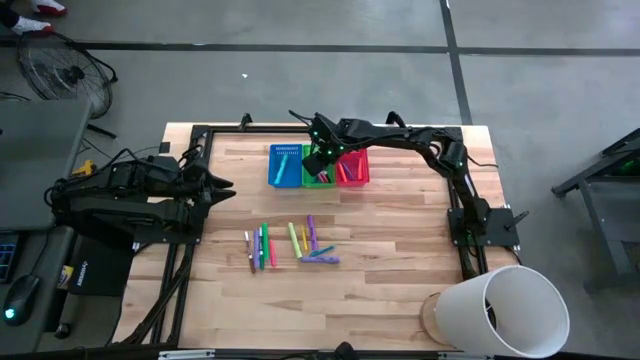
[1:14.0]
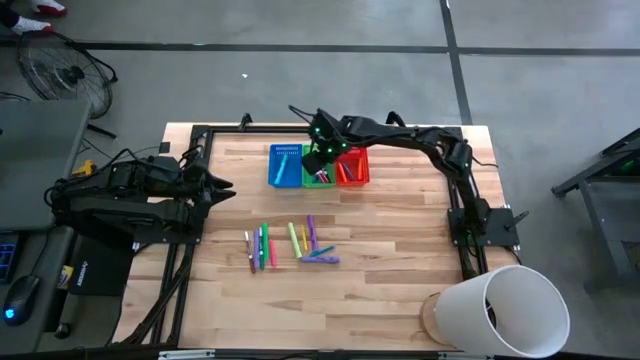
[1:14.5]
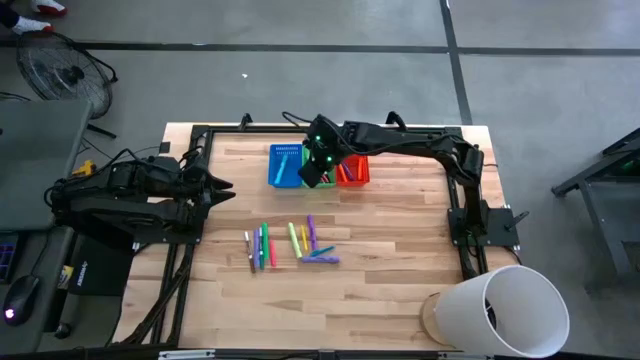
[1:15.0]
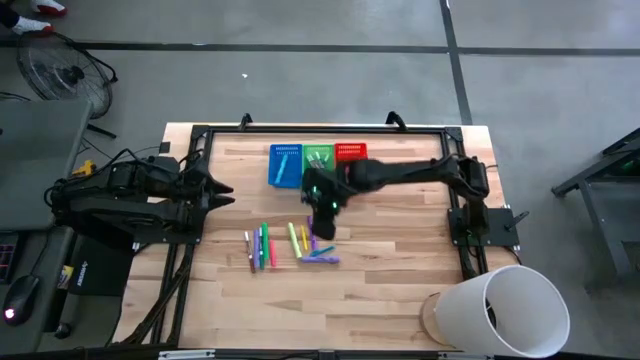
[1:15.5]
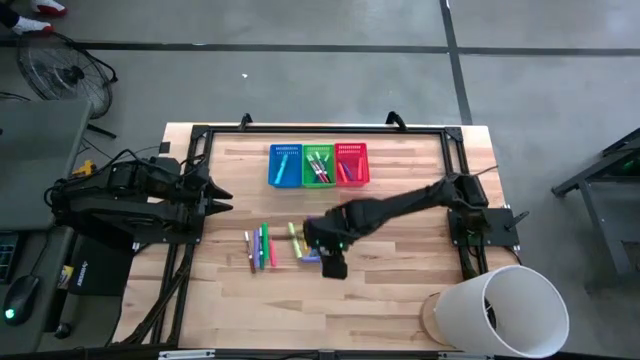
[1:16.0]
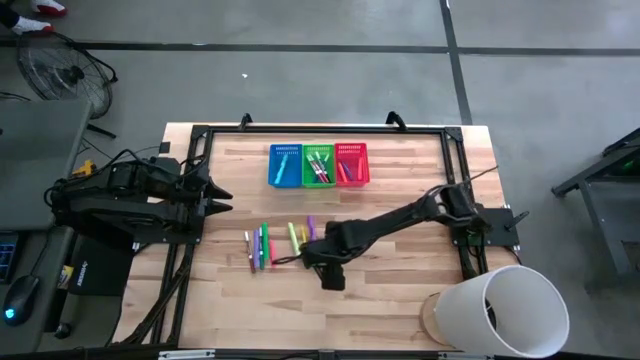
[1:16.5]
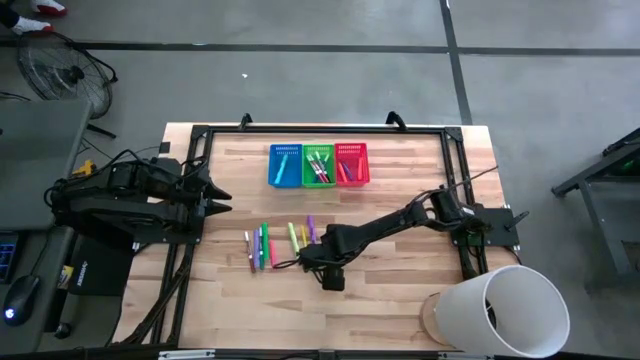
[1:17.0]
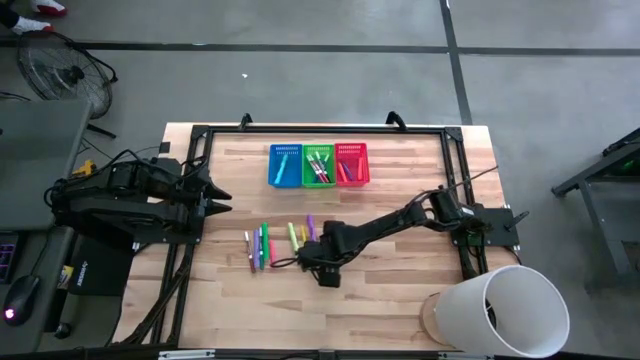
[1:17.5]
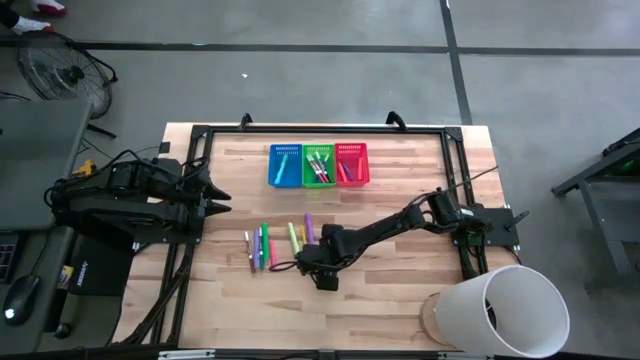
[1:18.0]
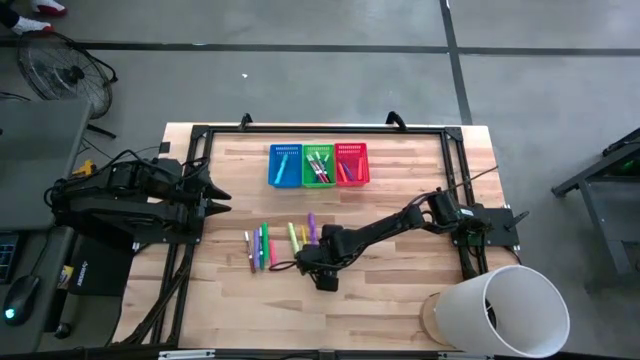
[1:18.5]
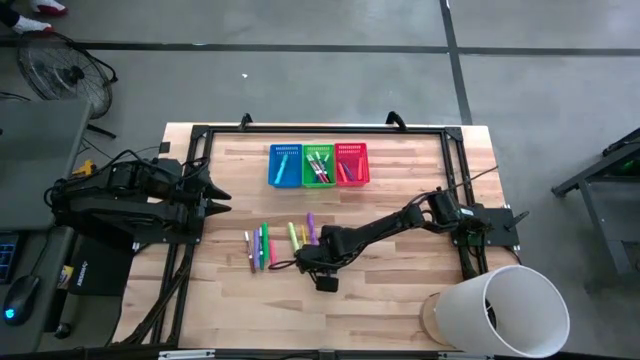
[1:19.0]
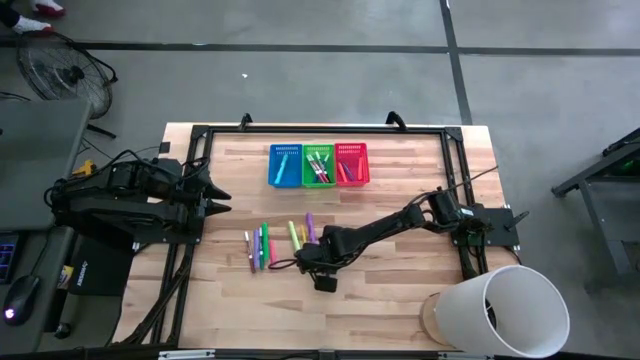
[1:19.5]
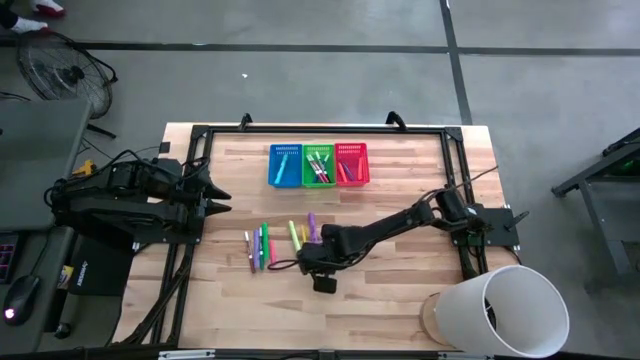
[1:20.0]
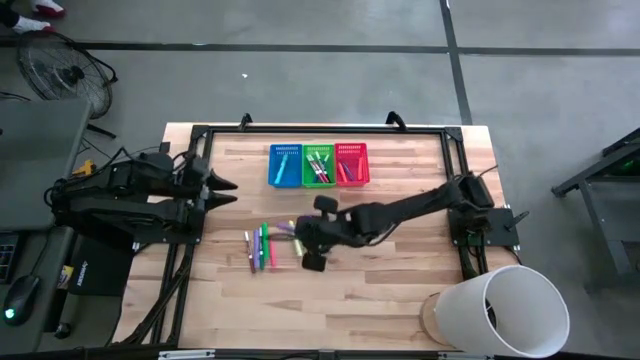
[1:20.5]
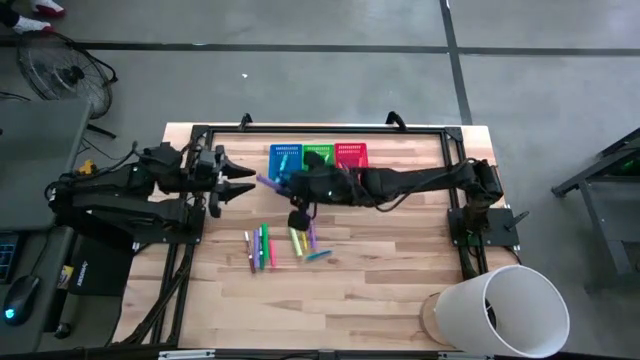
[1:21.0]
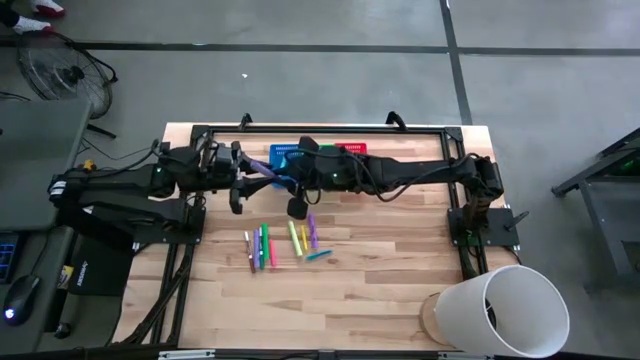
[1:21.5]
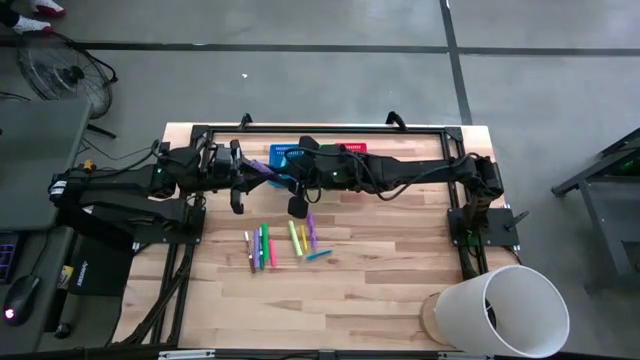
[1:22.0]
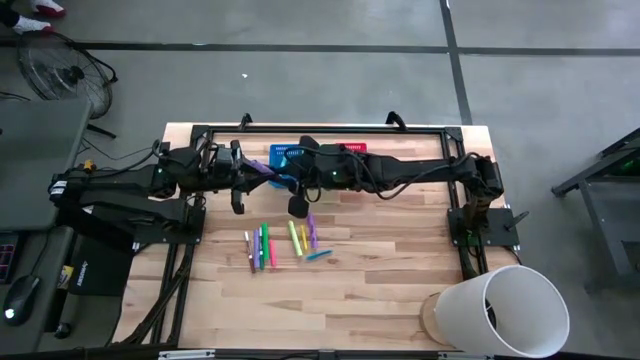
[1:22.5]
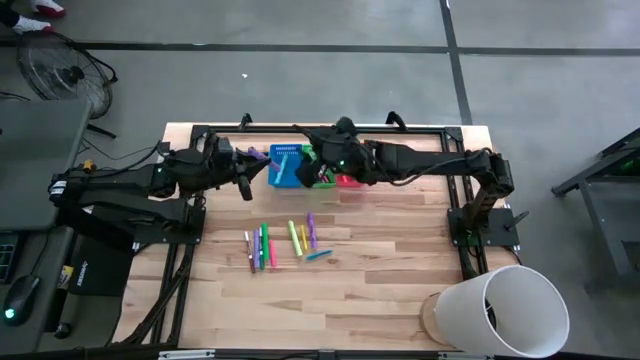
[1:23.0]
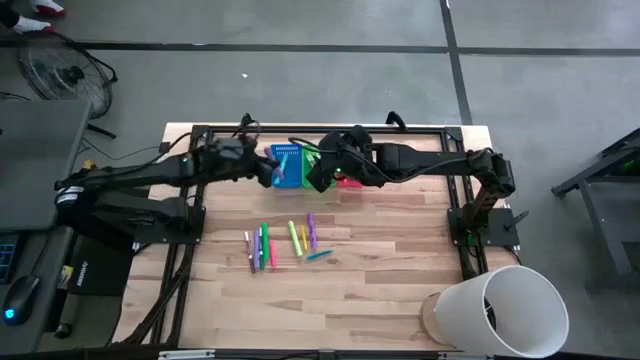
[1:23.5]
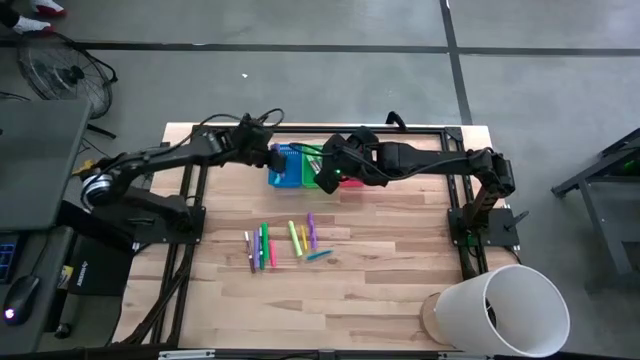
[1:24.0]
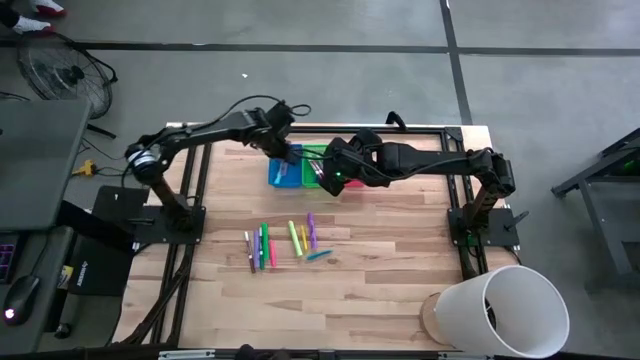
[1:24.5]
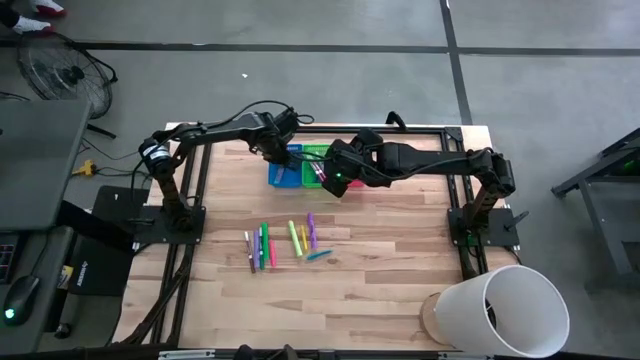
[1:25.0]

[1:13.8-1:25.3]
Task: Pick & Place Markers
Put the purple highlighter into the blue bin

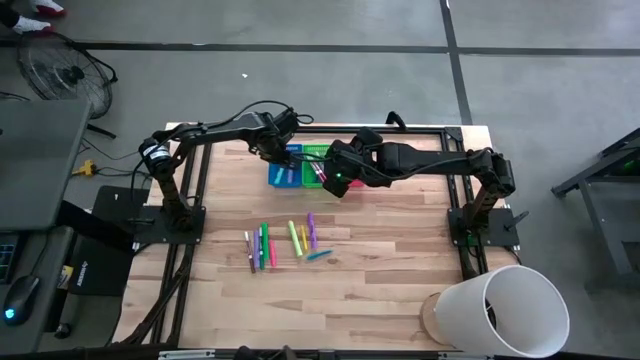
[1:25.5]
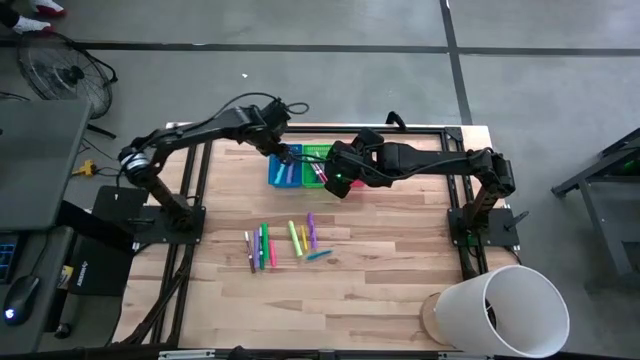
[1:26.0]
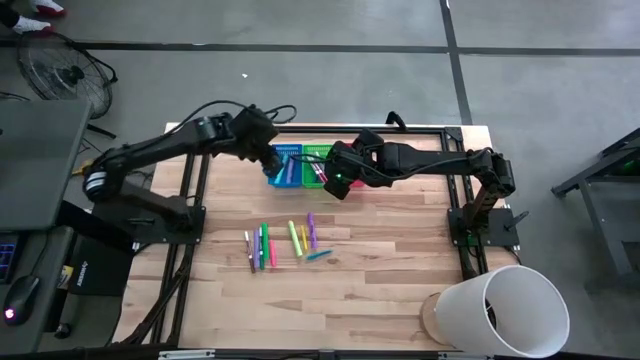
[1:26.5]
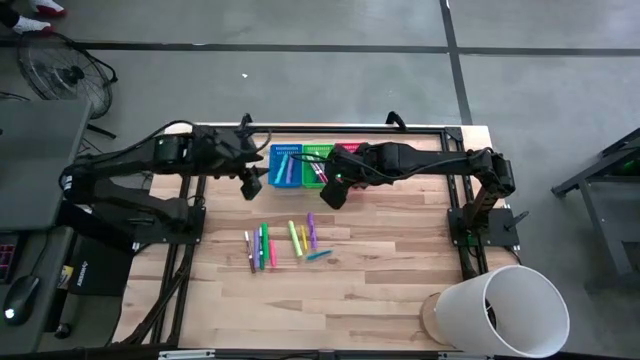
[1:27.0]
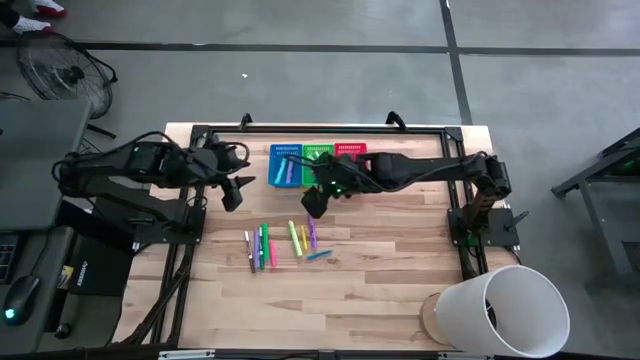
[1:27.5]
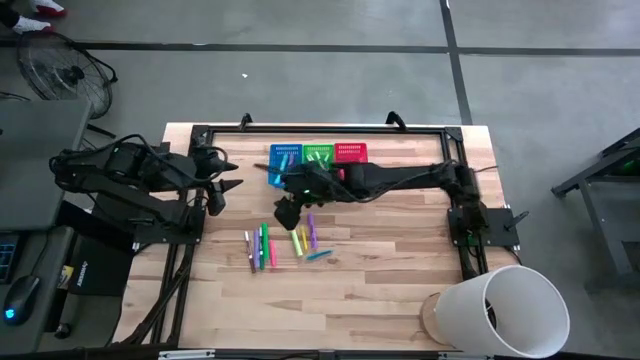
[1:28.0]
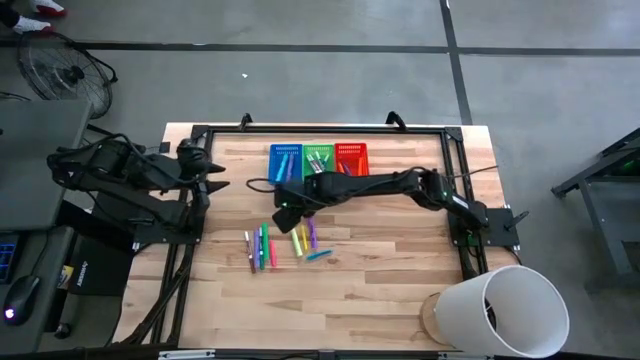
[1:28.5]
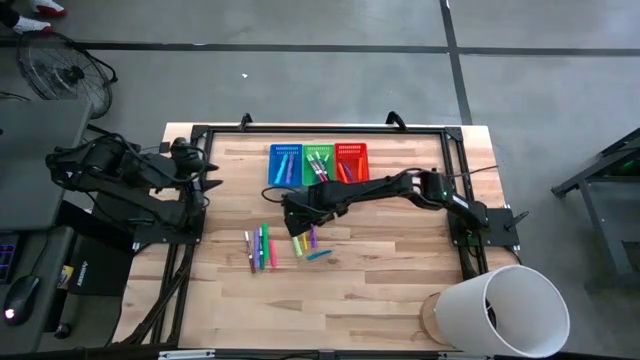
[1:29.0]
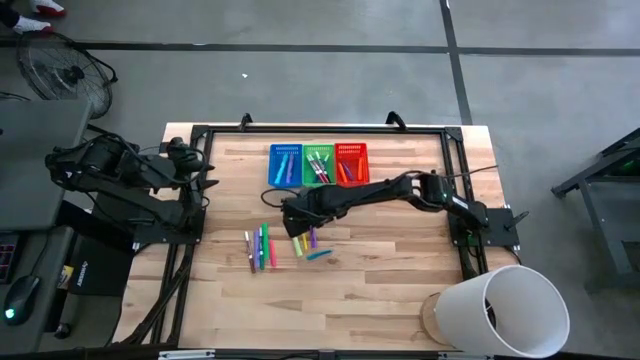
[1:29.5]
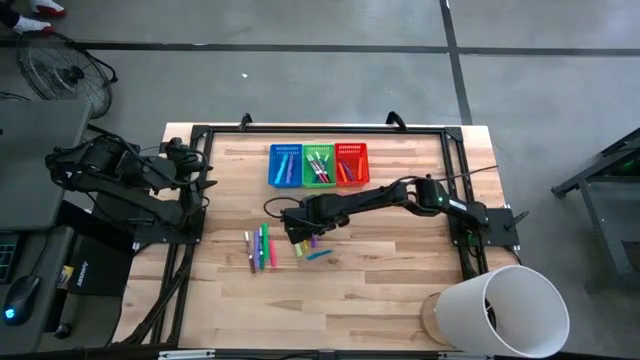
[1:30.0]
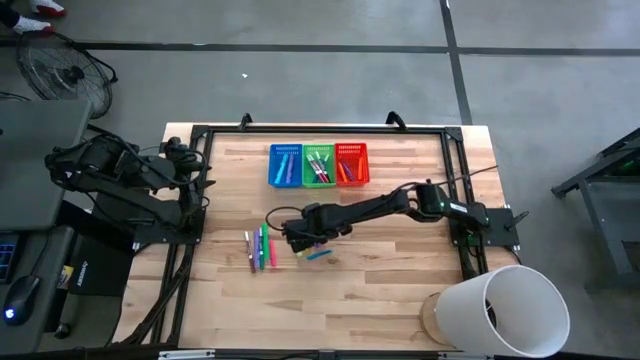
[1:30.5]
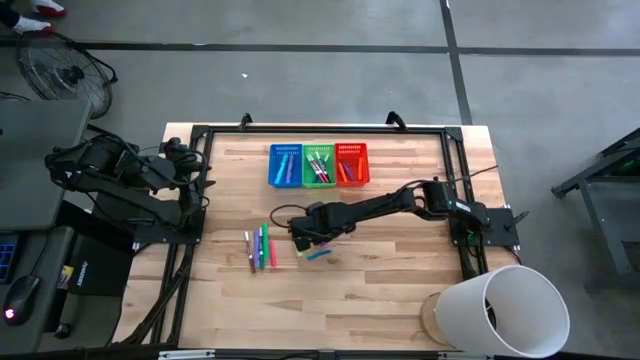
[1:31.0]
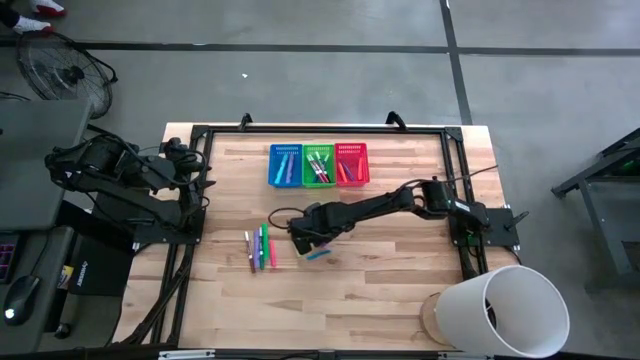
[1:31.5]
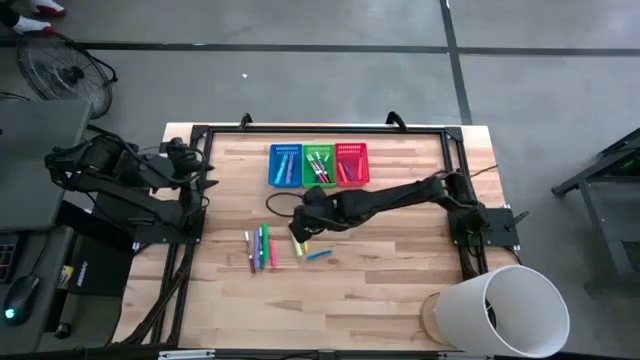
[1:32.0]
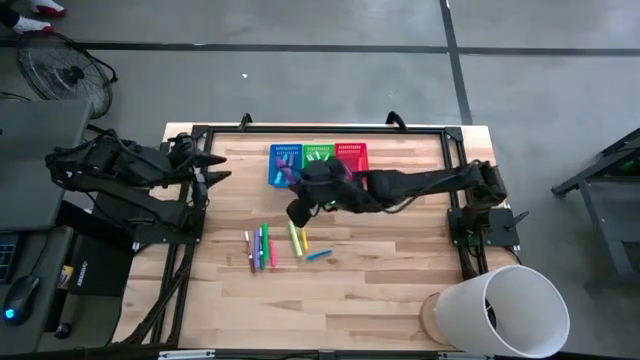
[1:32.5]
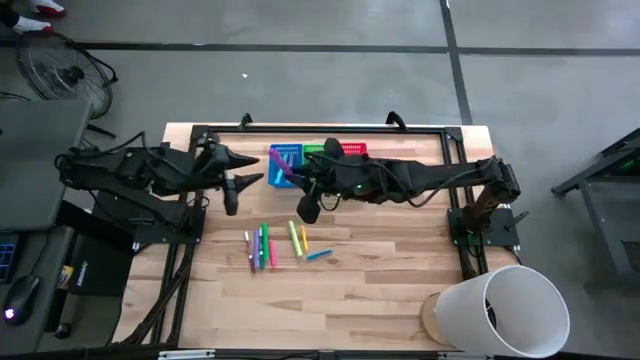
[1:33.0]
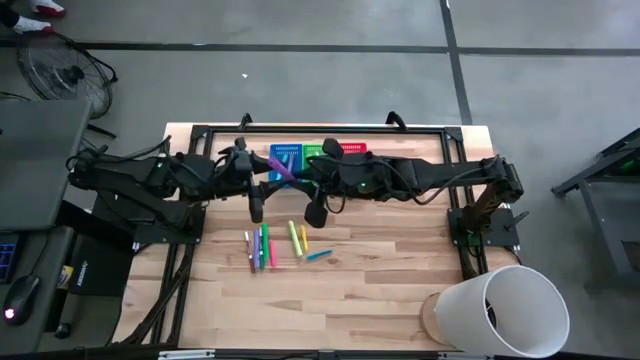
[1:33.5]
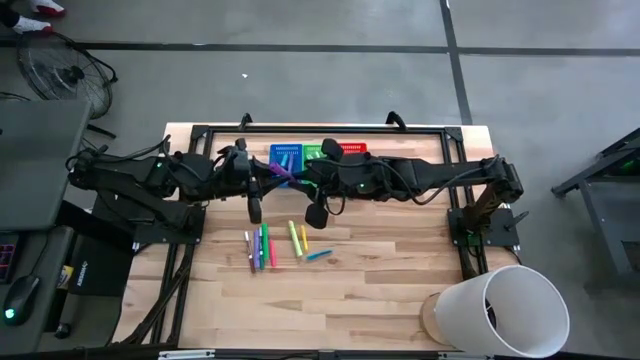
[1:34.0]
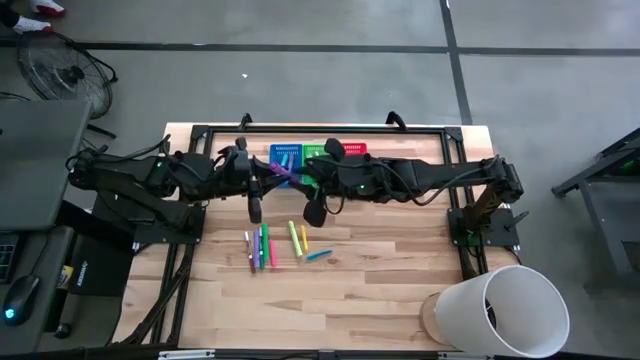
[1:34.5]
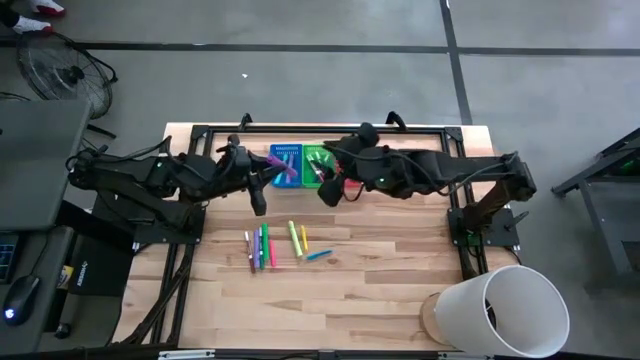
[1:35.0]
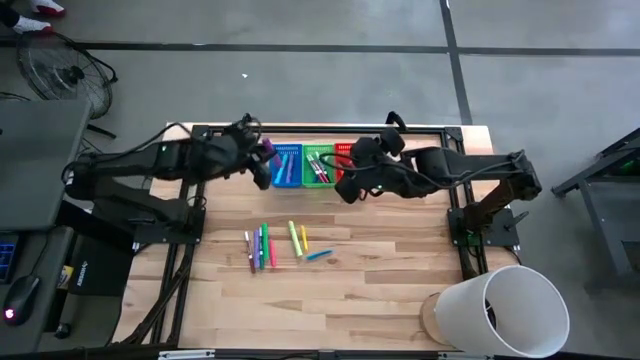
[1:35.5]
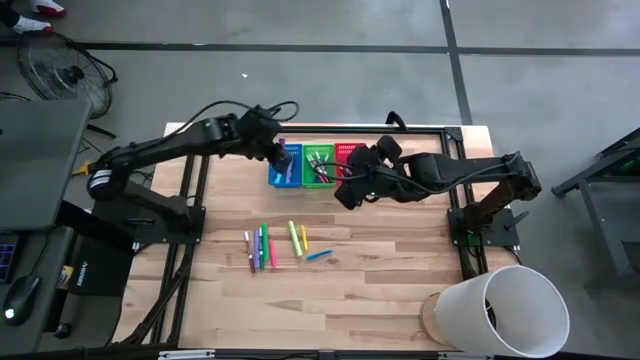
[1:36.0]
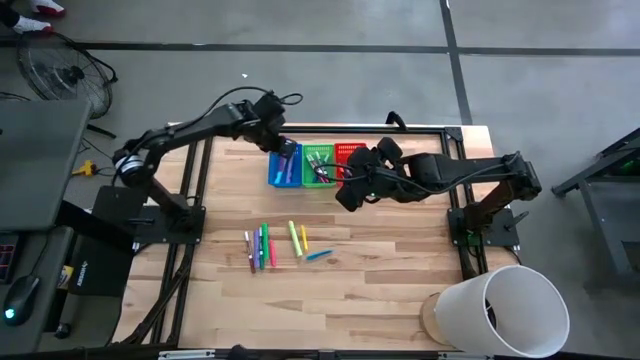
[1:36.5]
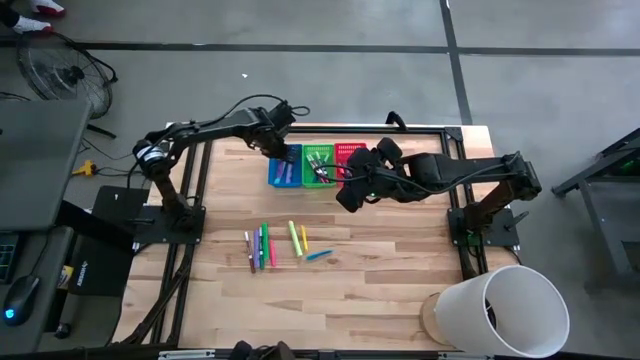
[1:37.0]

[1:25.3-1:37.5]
Put the purple highlighter into the blue bin
